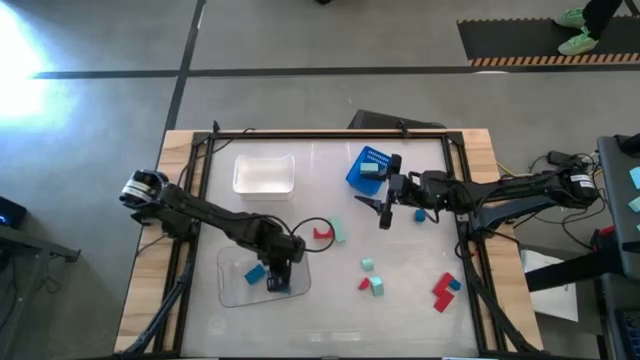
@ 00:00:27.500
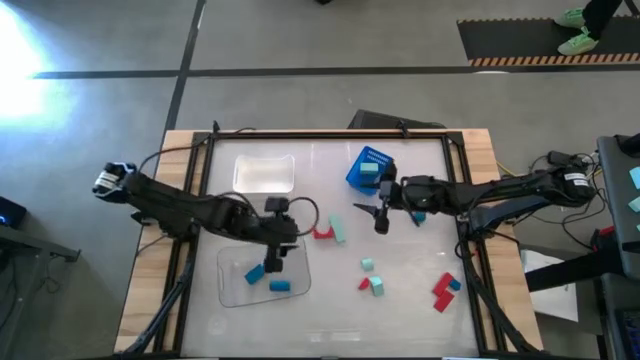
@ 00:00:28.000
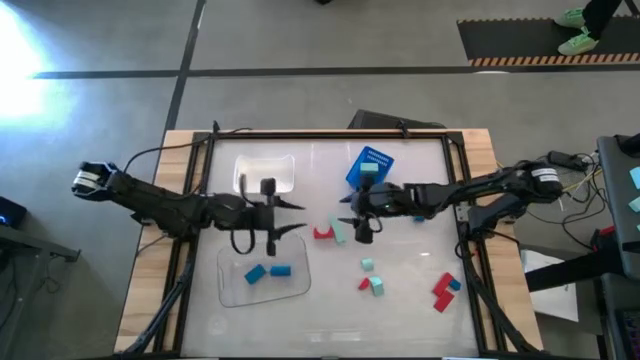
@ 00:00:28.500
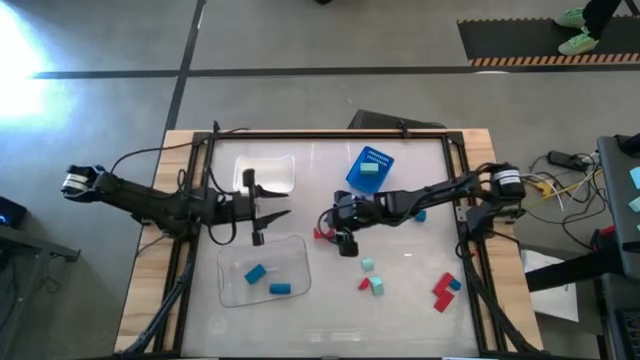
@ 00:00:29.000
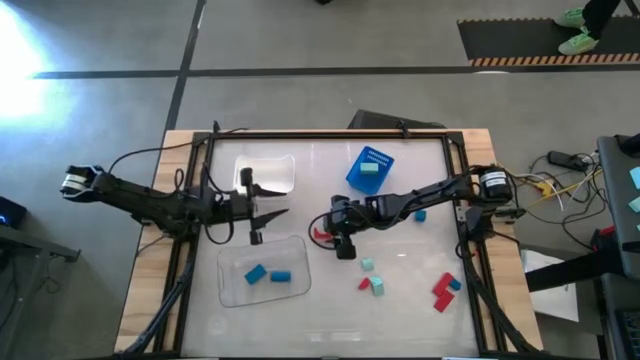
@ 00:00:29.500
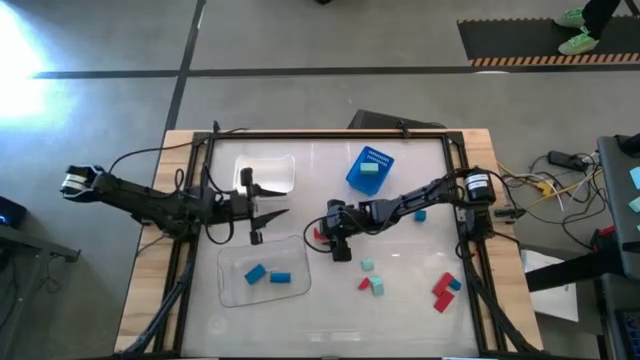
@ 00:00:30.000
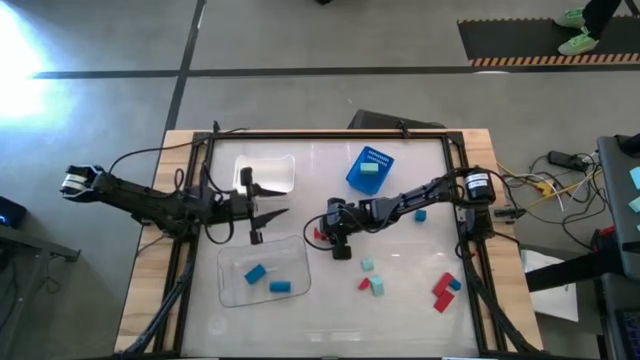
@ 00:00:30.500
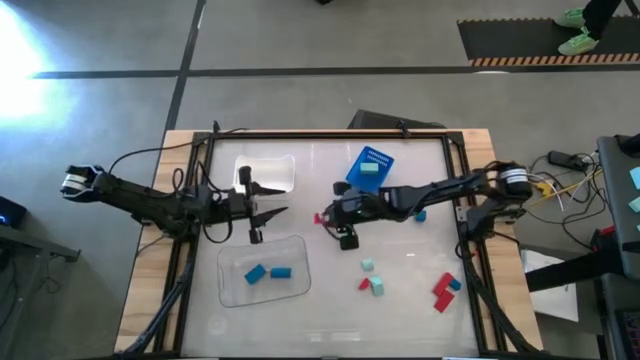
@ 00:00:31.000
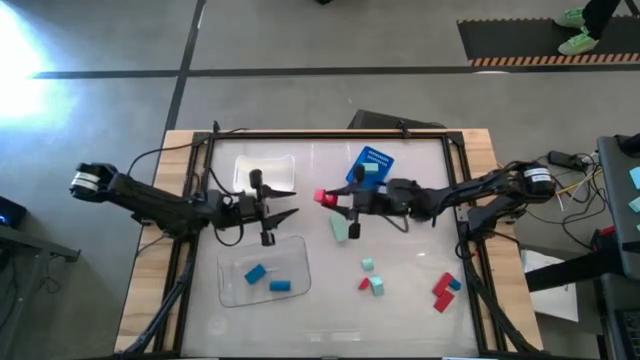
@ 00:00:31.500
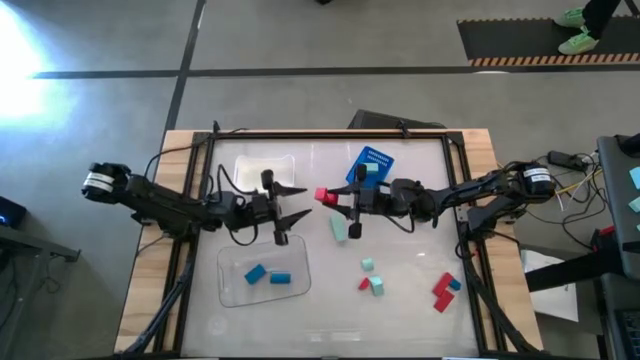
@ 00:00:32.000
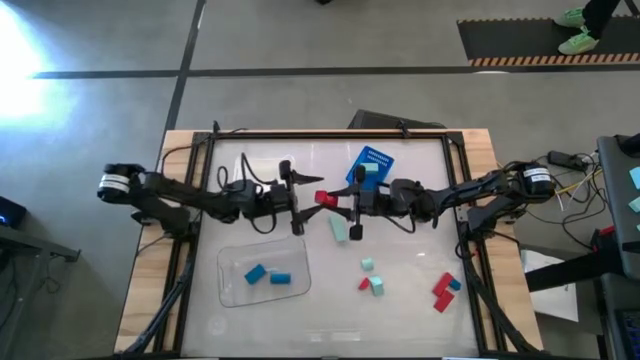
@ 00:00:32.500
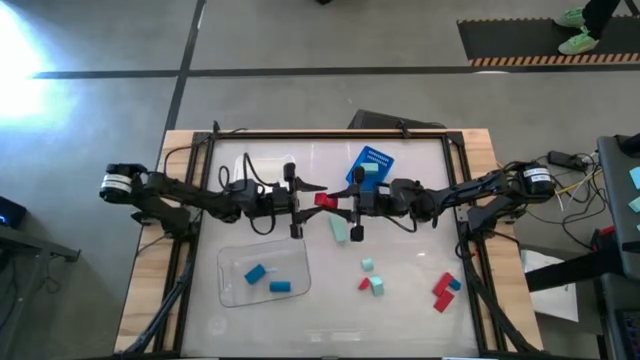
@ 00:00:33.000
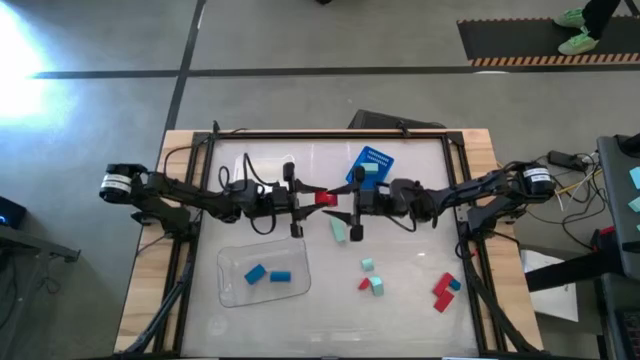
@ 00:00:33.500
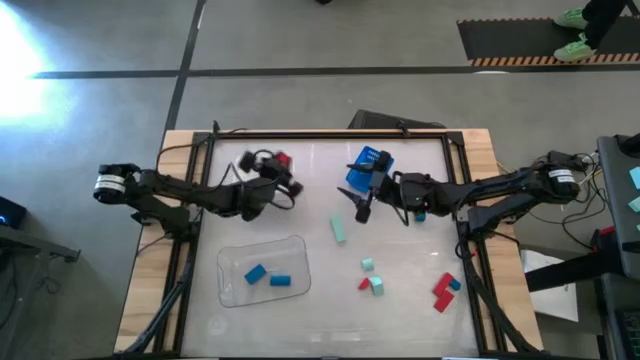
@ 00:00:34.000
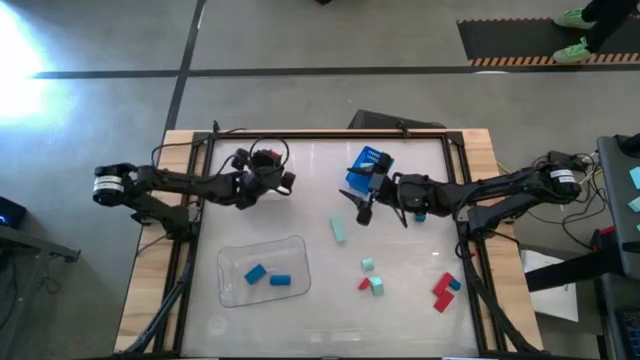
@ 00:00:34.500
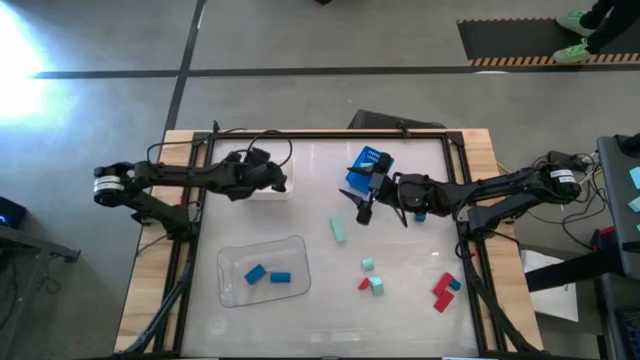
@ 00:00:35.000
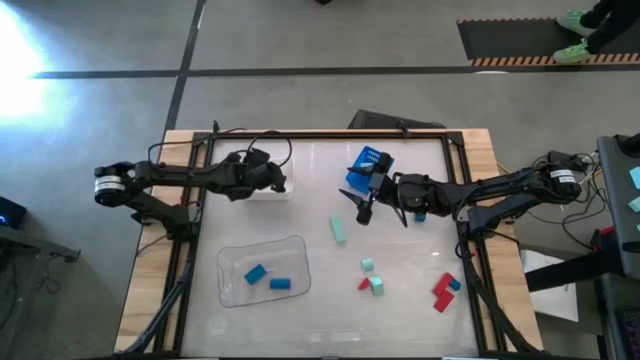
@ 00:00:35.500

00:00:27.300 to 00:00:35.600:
Task: Sort & place blocks by color
Put the red block into the white bin

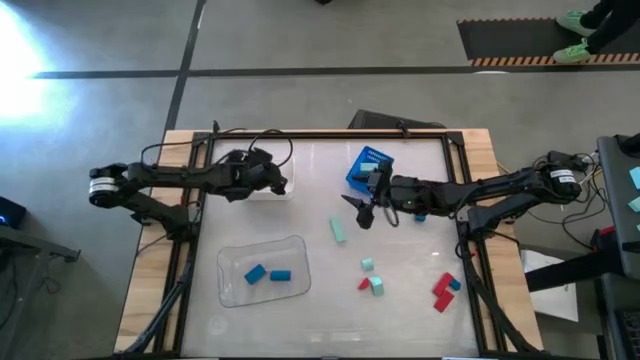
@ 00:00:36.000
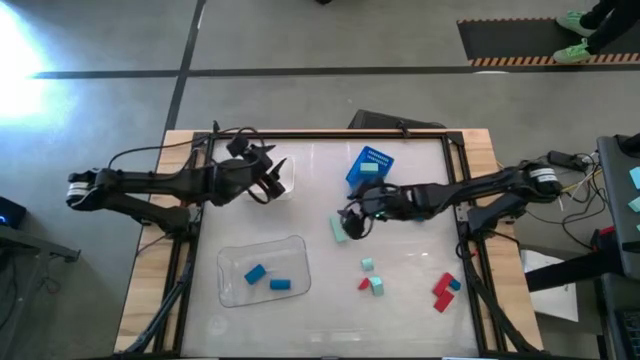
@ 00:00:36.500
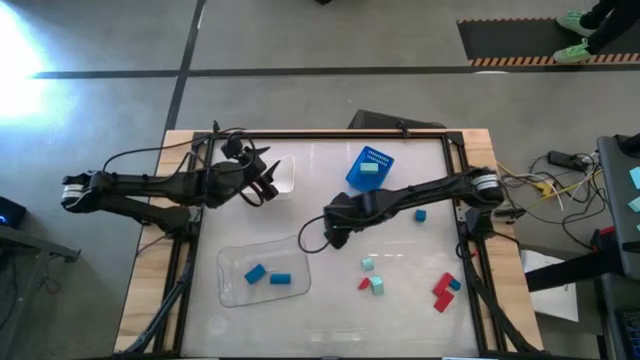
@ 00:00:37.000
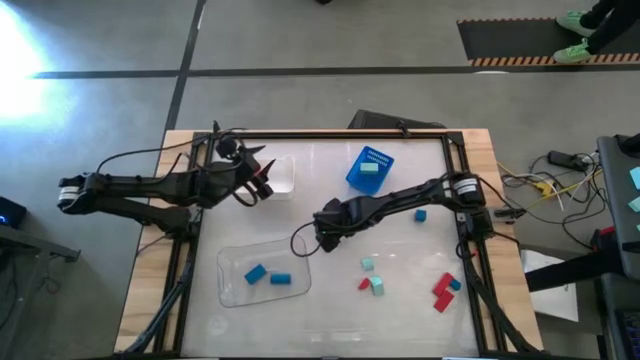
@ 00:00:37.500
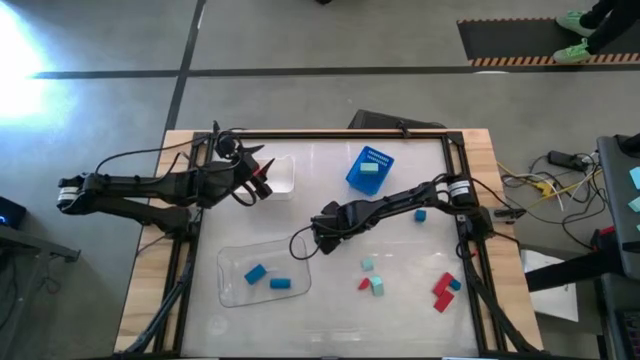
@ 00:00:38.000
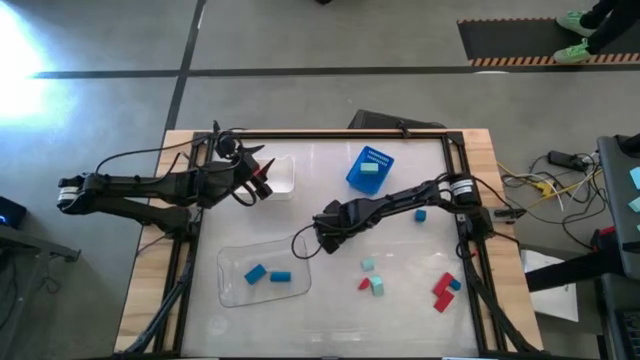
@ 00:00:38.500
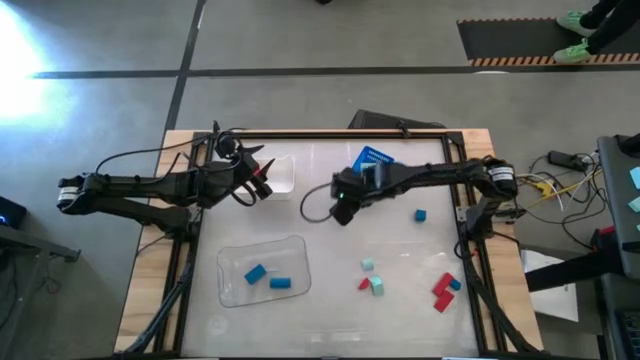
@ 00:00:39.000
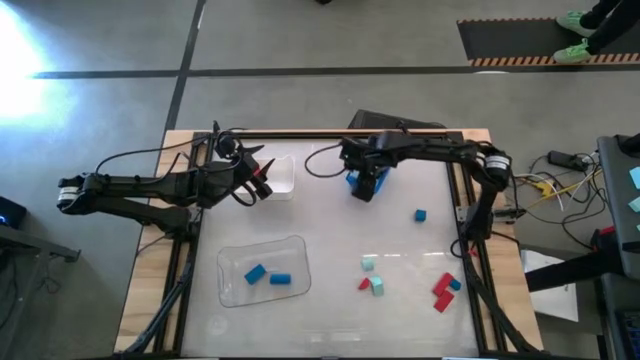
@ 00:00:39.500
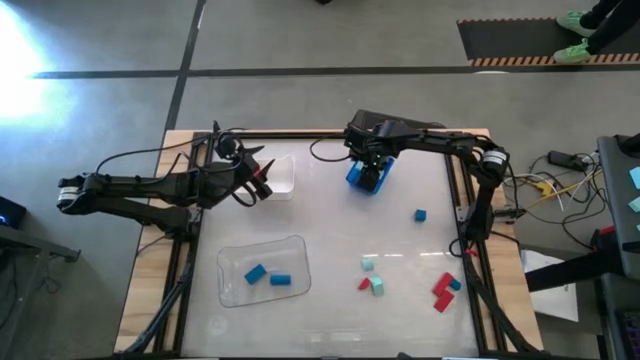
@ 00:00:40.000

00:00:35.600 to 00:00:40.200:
Put the light blue block into the blue bin

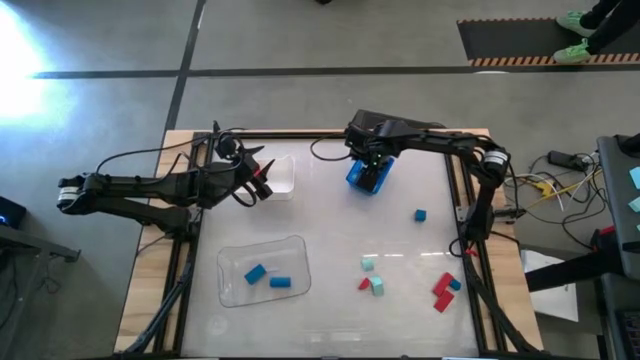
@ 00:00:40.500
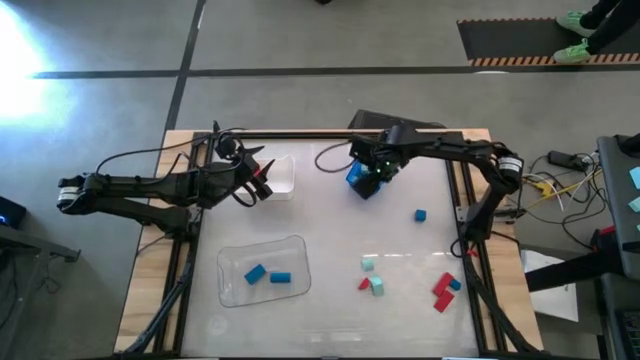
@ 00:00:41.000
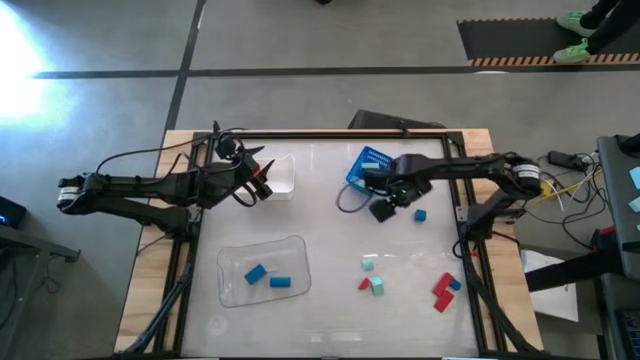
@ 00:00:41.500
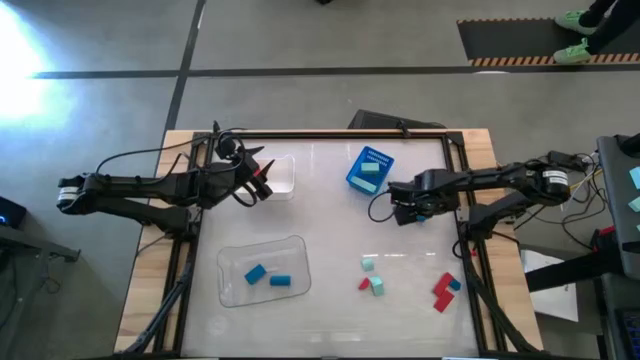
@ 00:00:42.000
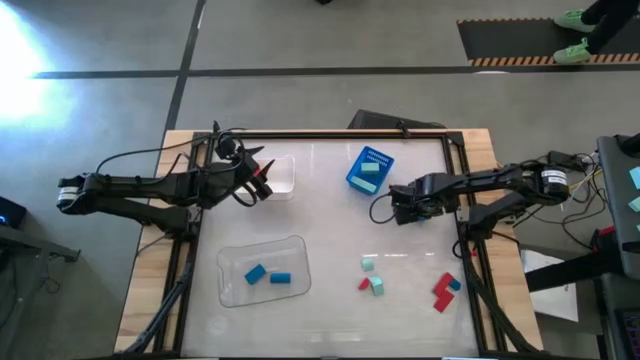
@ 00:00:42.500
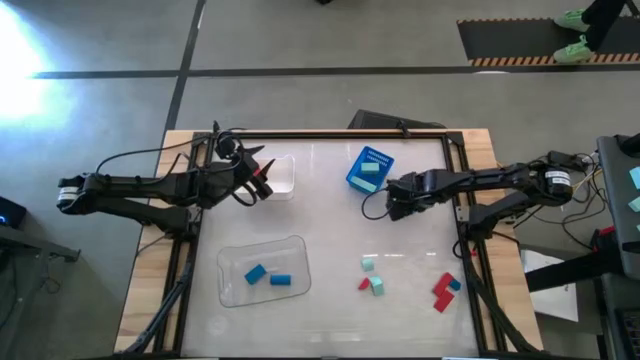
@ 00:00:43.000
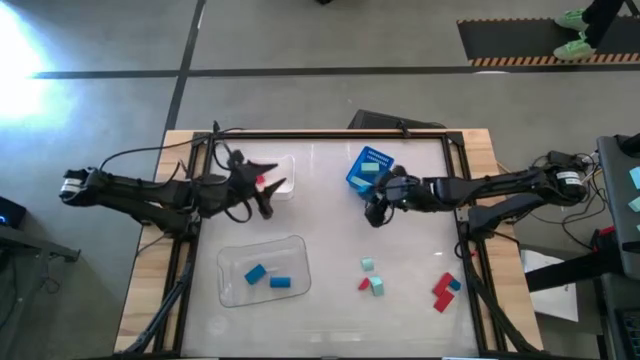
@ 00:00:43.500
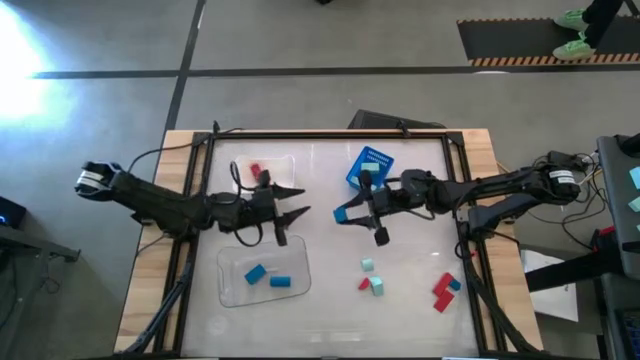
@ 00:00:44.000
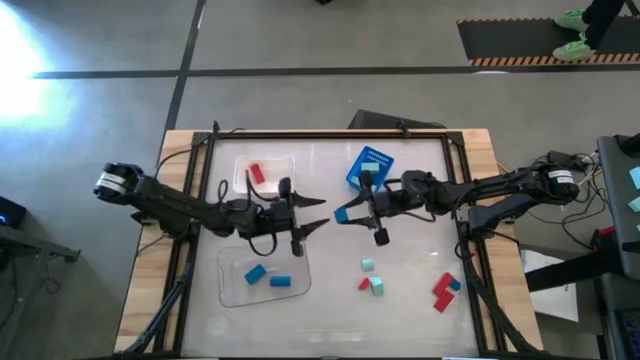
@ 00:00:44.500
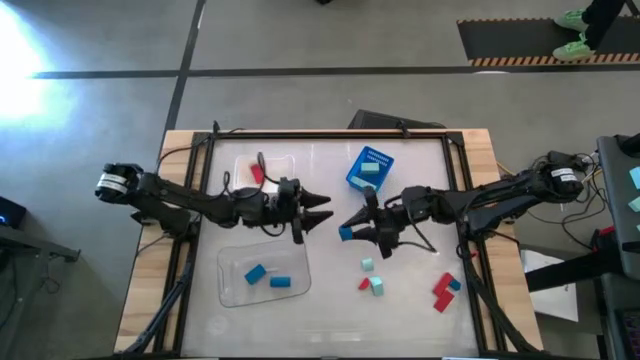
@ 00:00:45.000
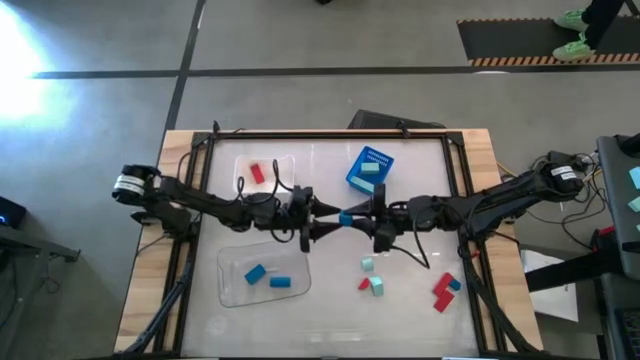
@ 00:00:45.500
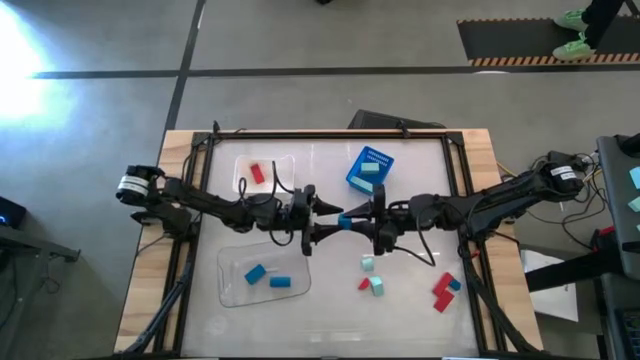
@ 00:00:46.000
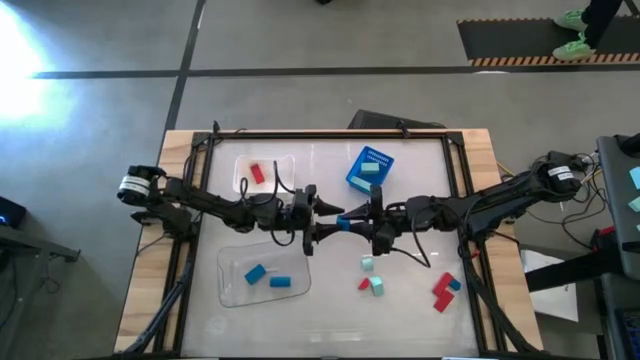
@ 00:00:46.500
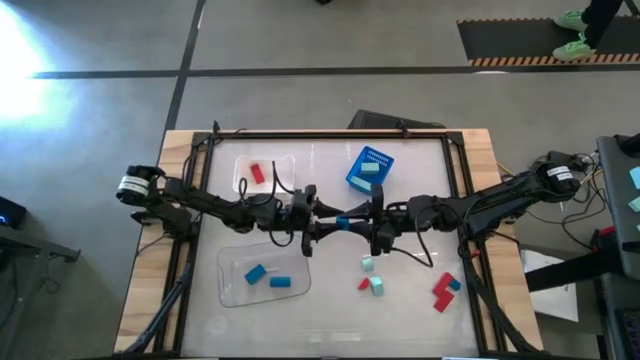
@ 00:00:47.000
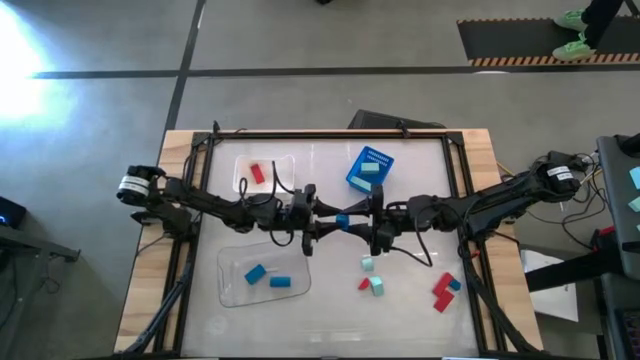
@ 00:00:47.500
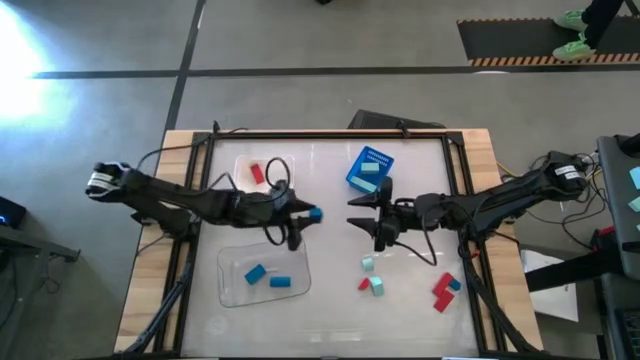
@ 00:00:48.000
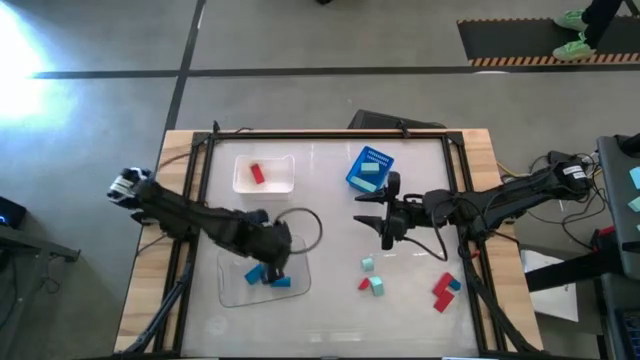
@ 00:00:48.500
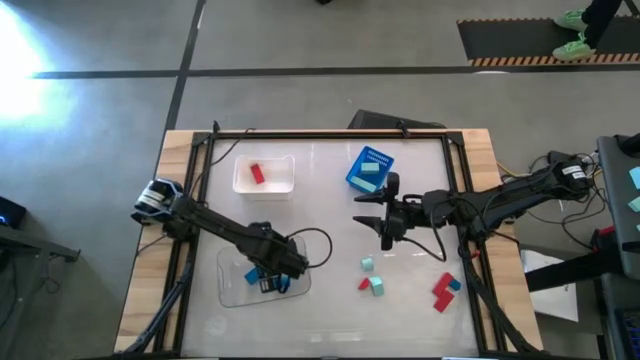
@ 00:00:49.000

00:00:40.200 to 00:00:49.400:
Put the blue block into the transparent bin
